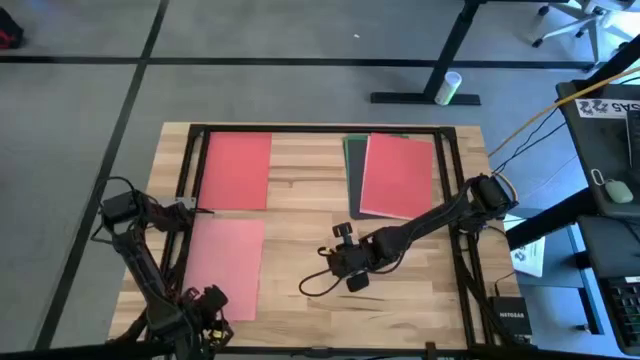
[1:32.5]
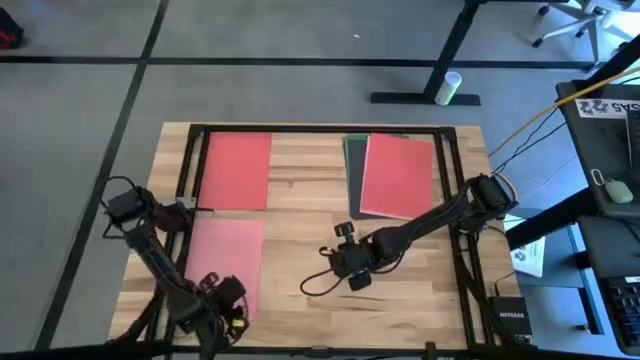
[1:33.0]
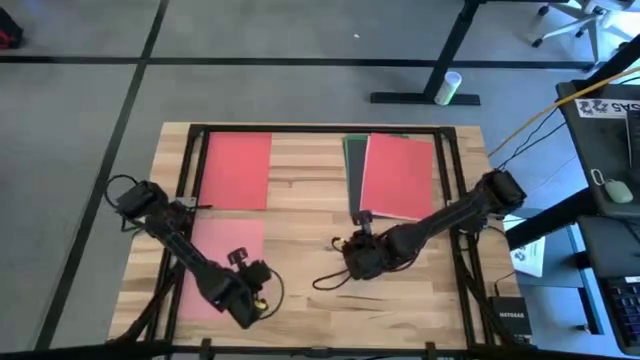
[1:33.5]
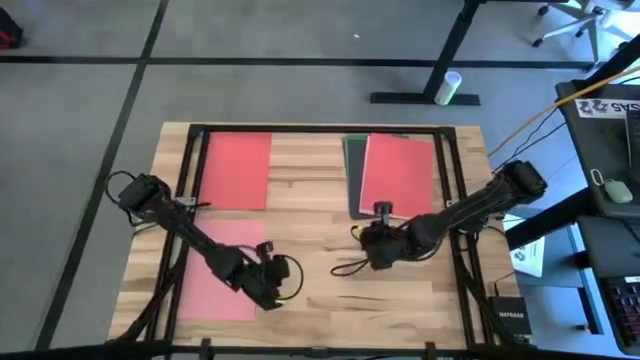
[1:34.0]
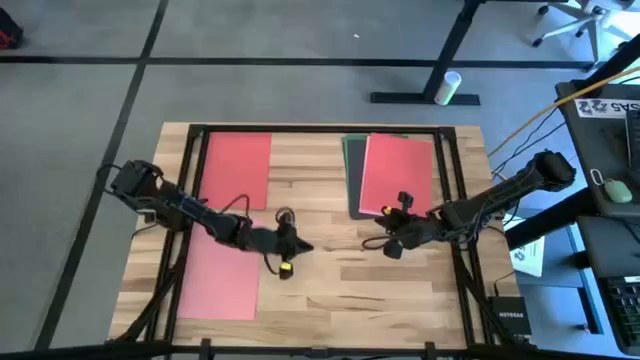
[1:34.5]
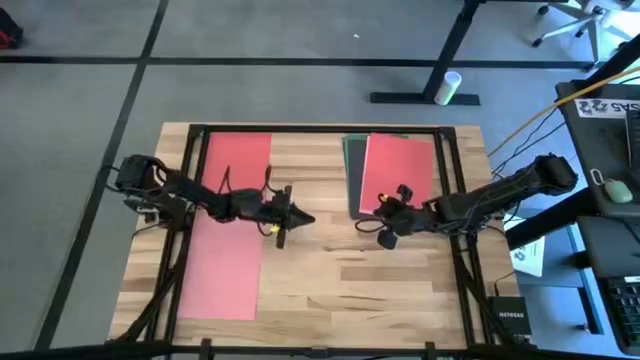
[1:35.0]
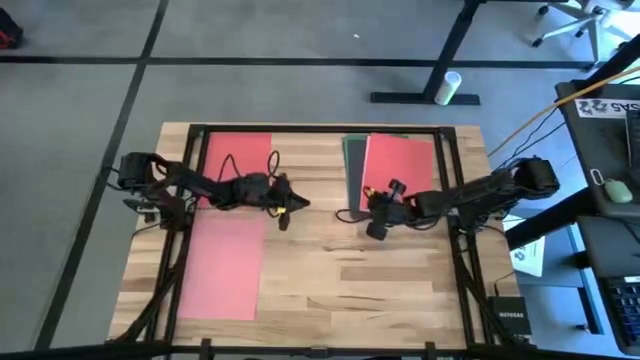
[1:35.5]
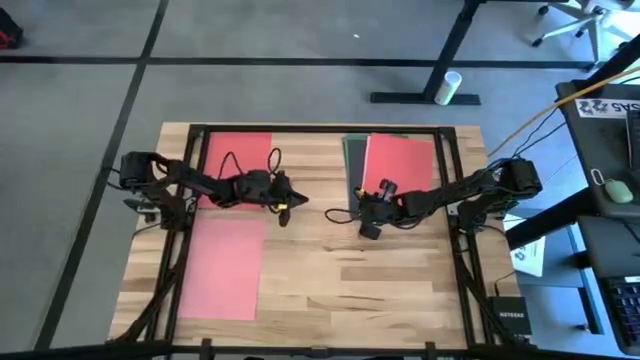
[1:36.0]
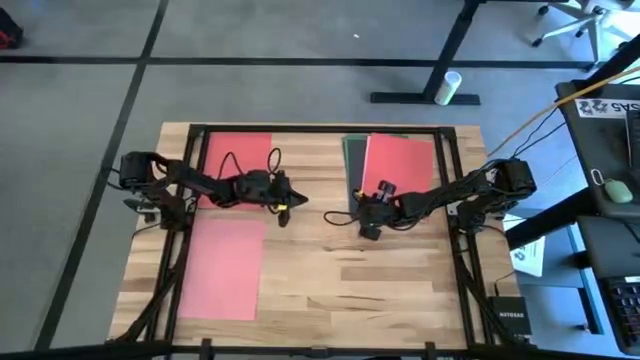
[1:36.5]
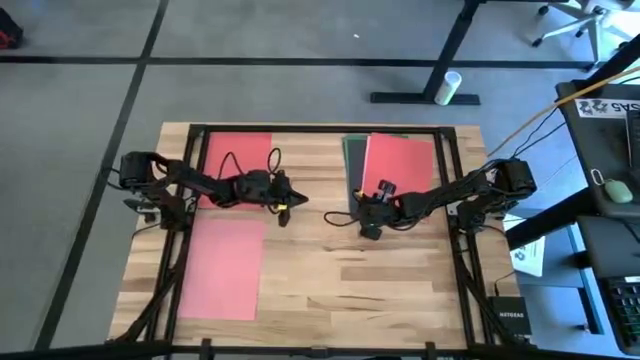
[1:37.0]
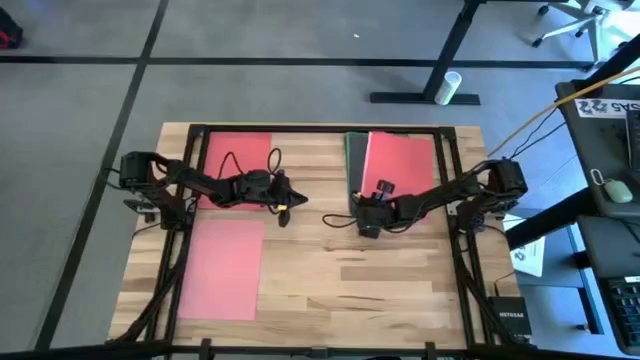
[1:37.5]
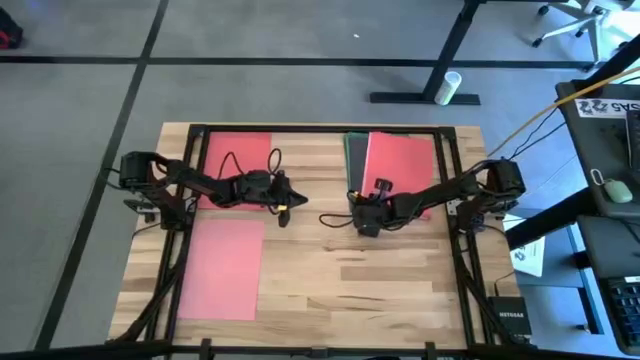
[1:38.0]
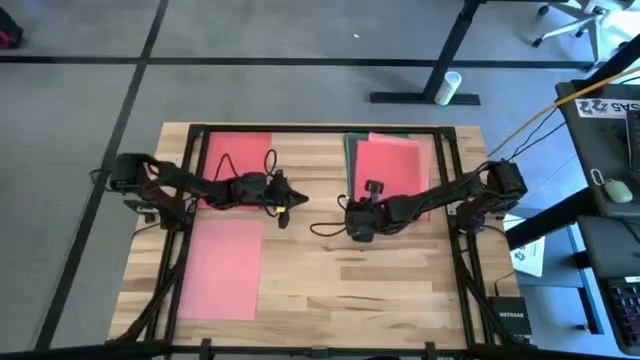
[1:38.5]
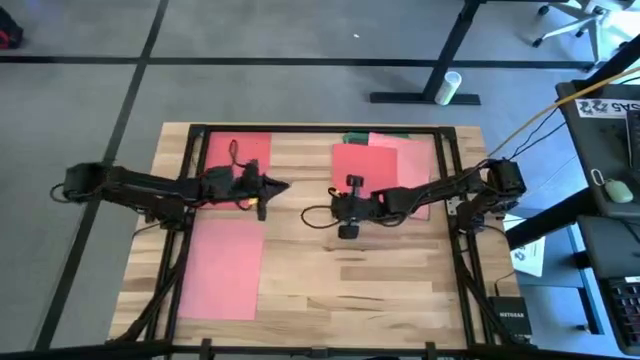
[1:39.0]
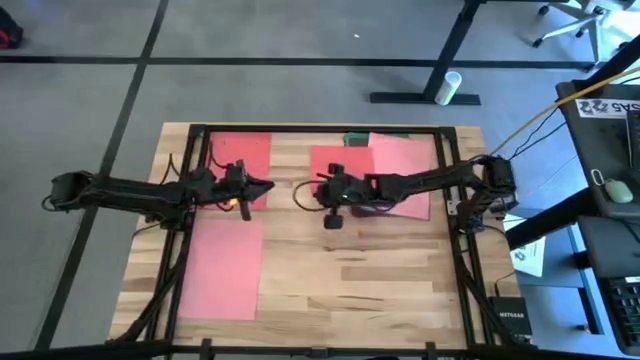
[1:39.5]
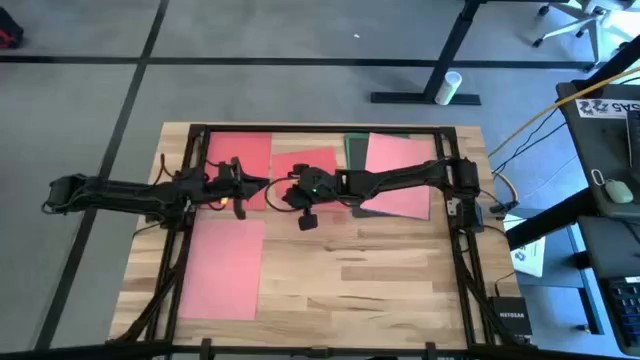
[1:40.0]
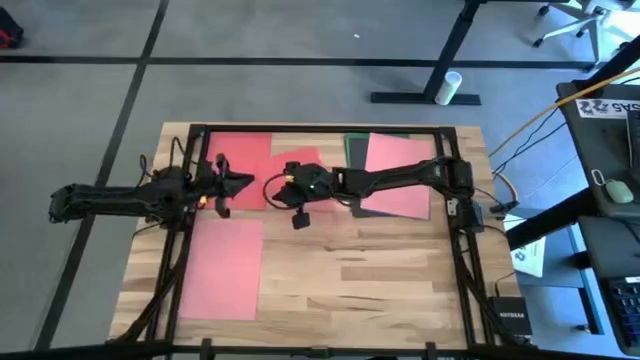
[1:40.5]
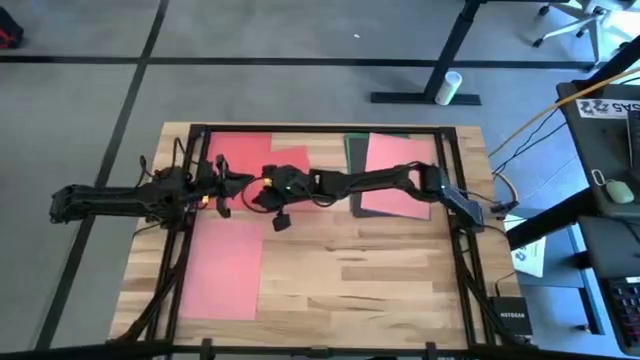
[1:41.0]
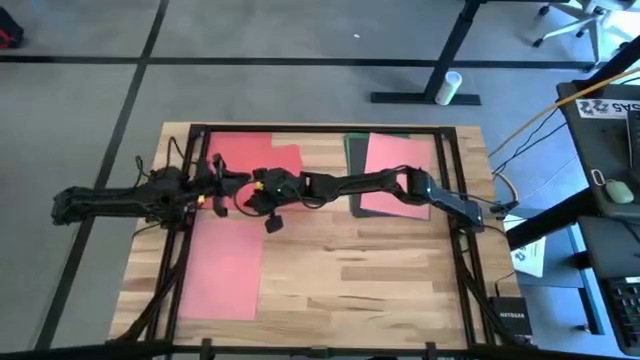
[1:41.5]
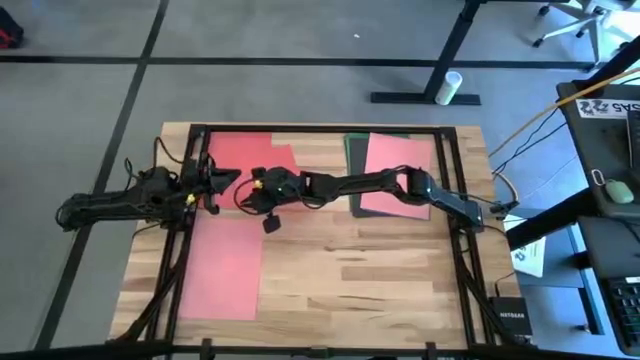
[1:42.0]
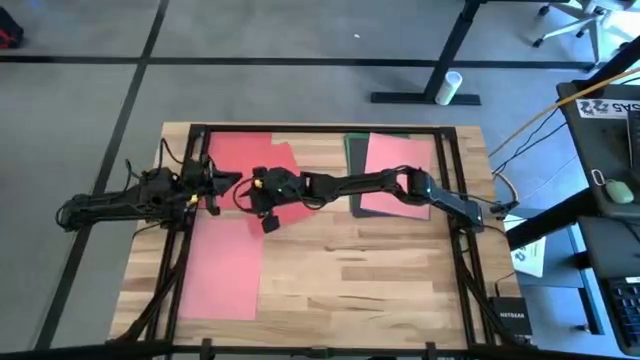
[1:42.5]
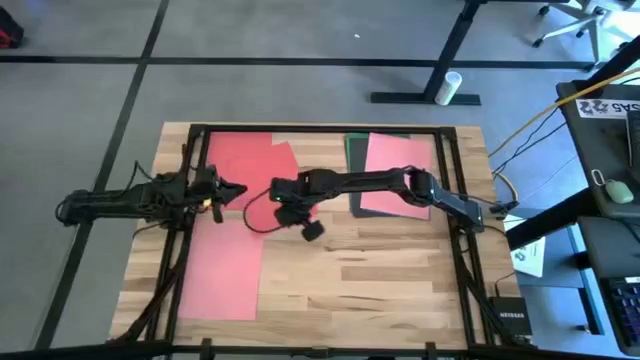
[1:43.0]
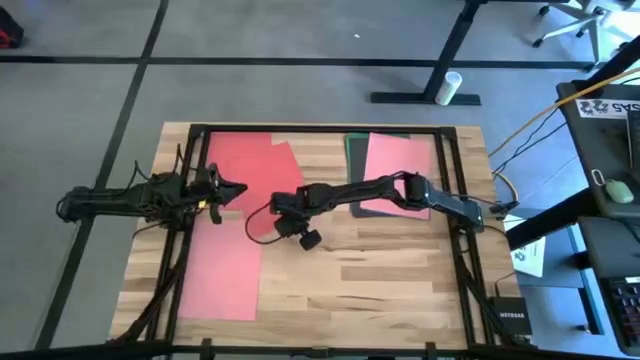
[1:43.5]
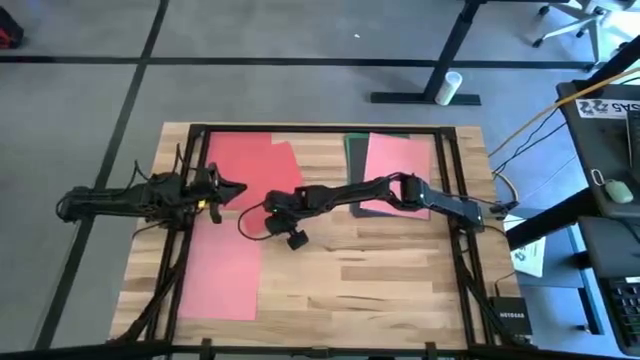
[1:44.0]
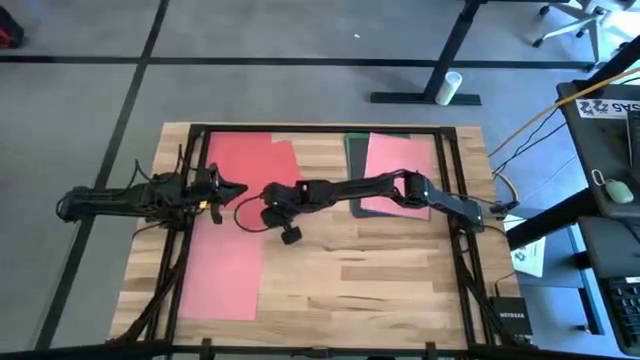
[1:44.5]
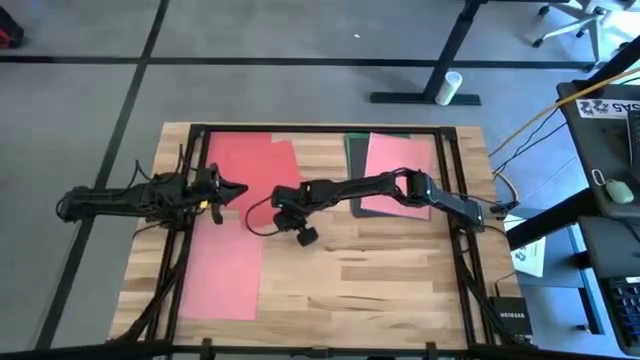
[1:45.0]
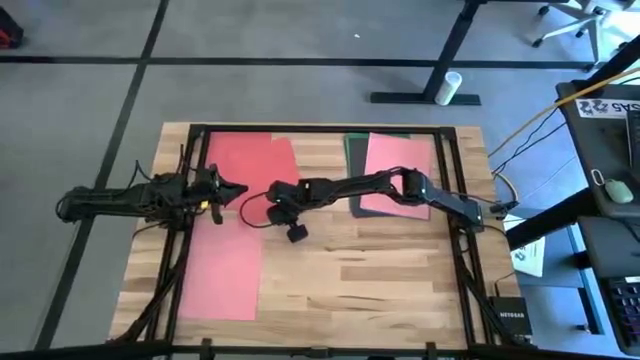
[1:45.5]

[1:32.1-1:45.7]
Task: Organize paper
Stack the red paper on top of the red papers

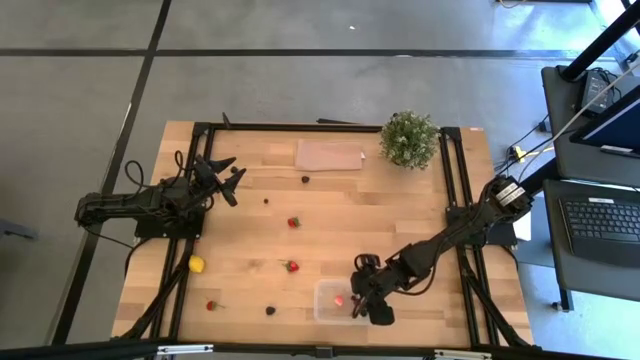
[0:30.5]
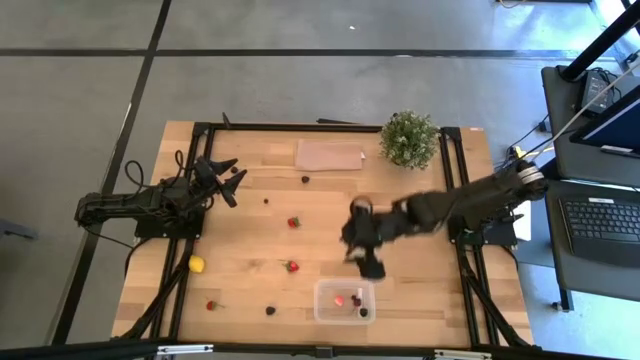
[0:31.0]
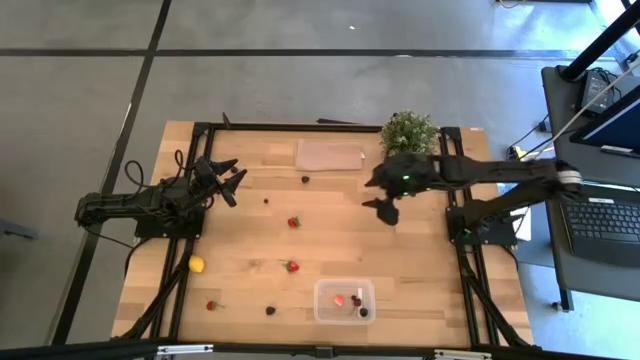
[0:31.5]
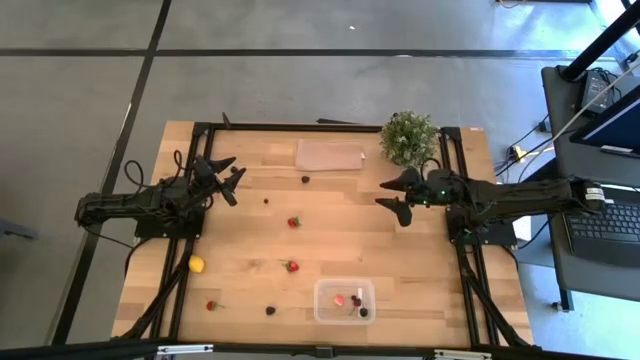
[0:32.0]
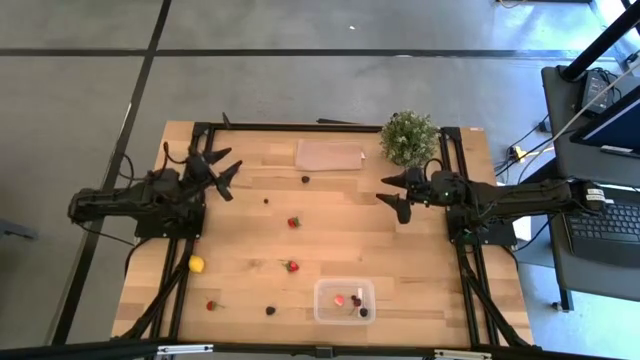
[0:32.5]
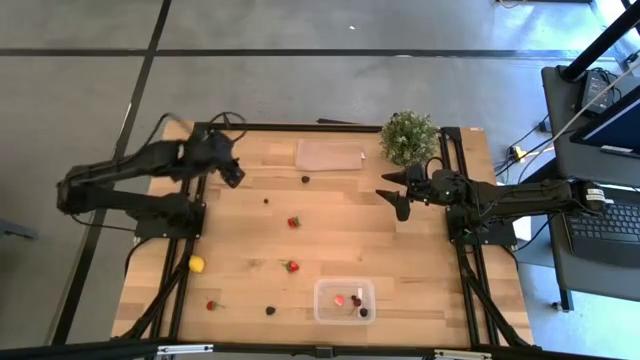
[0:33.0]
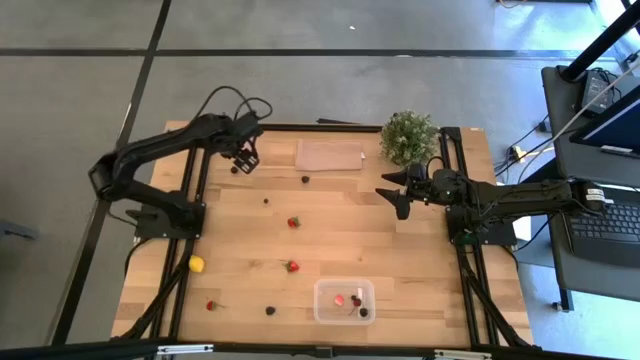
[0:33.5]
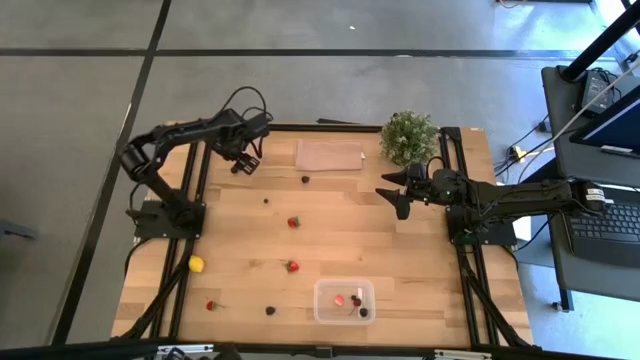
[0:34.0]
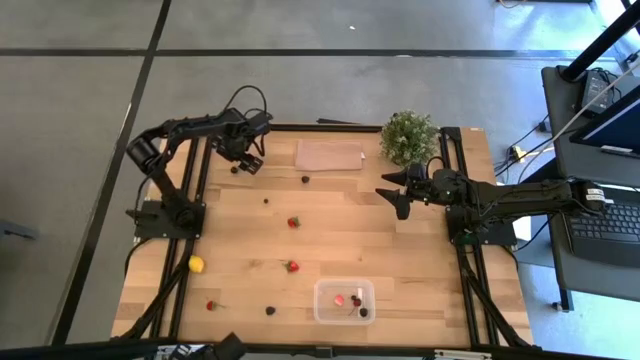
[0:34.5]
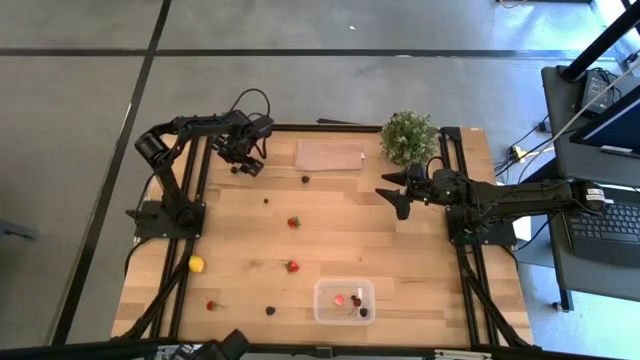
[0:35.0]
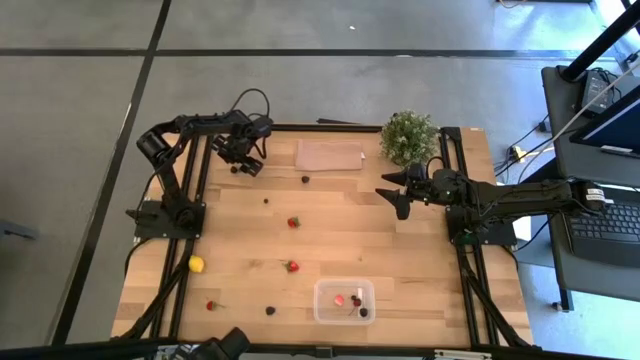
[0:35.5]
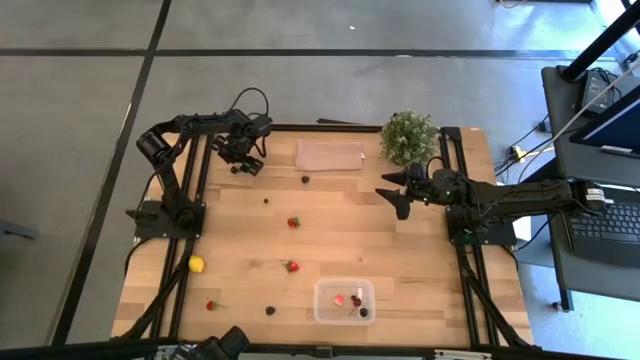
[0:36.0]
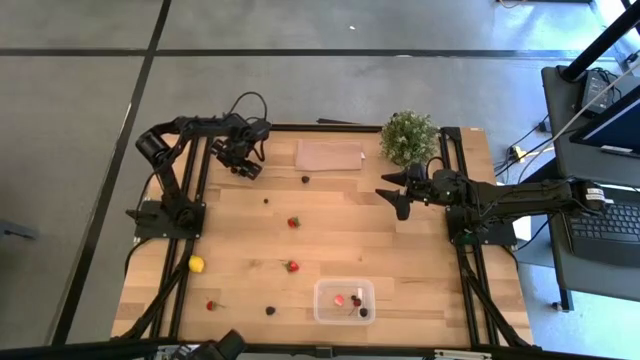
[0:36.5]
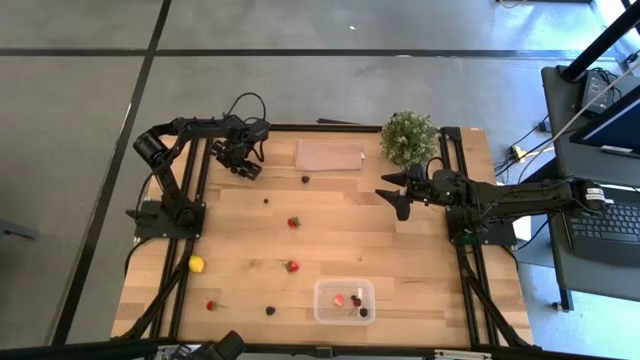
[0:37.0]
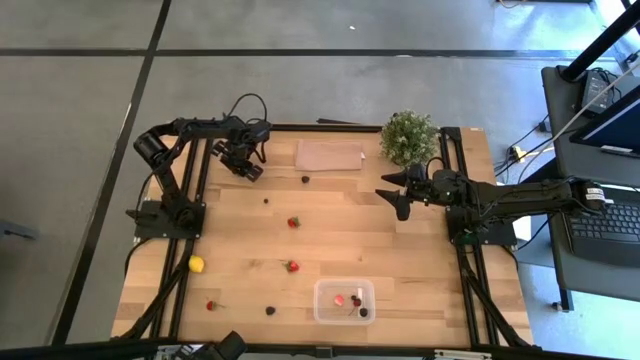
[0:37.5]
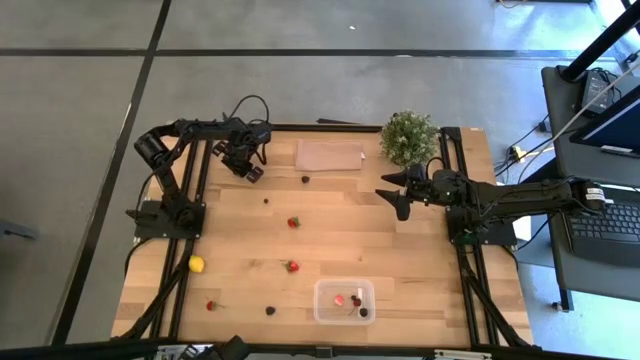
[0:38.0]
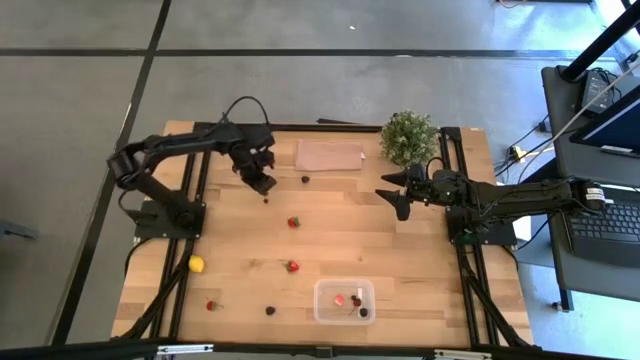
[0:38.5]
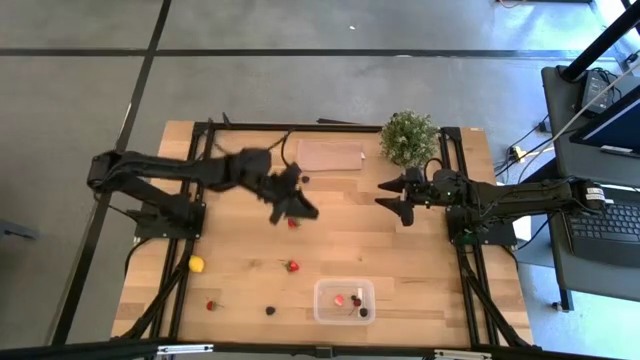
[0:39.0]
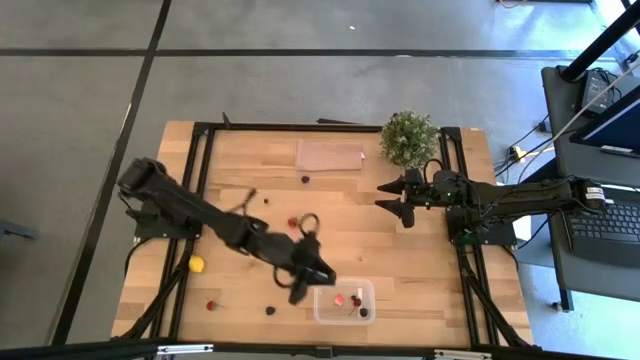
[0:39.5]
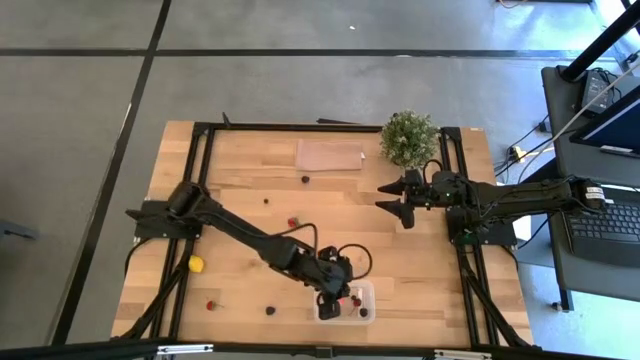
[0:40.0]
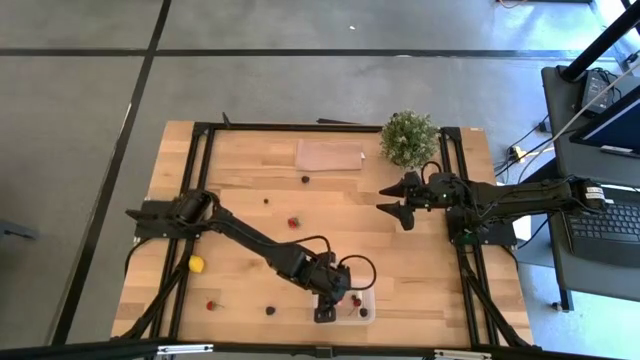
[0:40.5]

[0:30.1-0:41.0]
Task: Pick and placing Produce into tupperware
Put the black cherry into the transparent container
